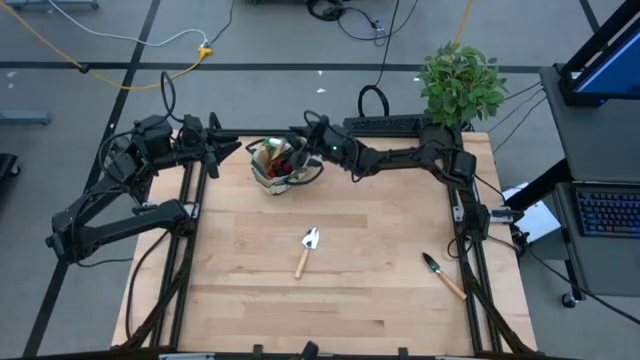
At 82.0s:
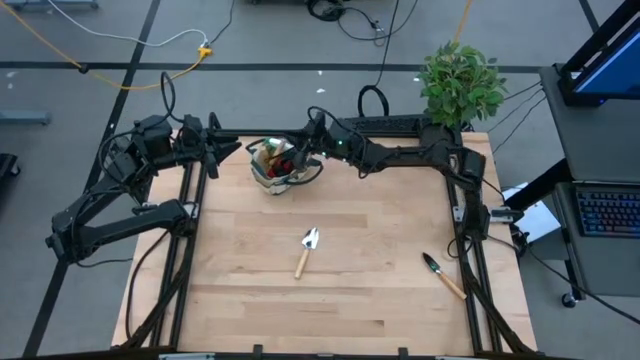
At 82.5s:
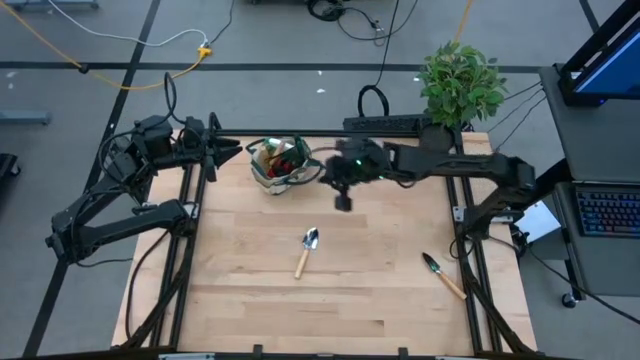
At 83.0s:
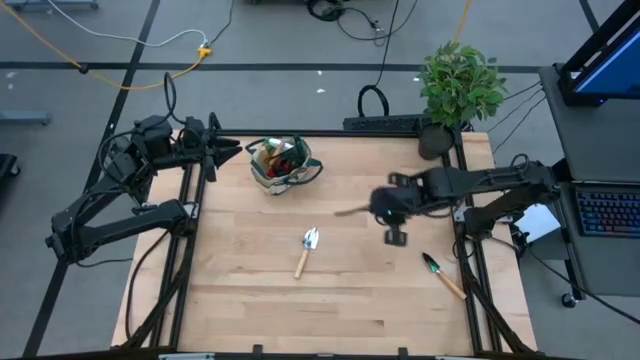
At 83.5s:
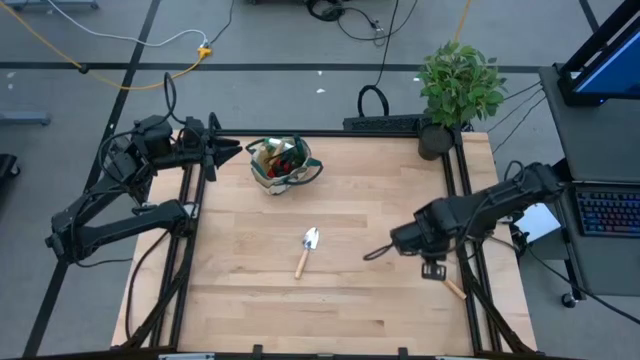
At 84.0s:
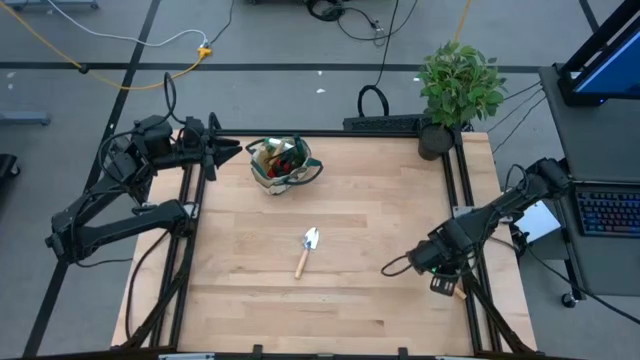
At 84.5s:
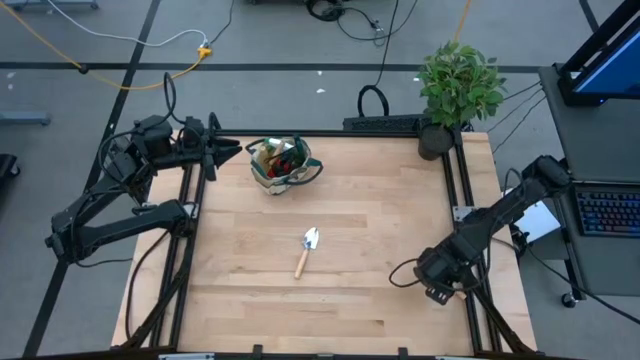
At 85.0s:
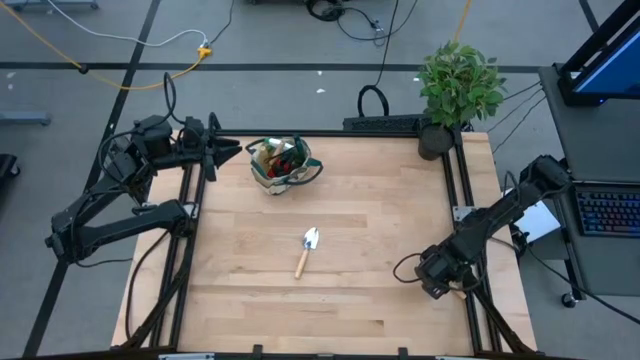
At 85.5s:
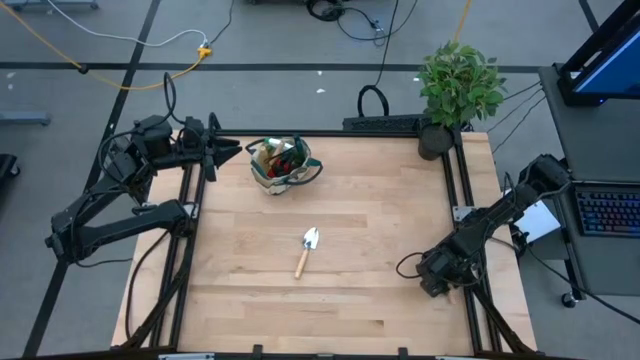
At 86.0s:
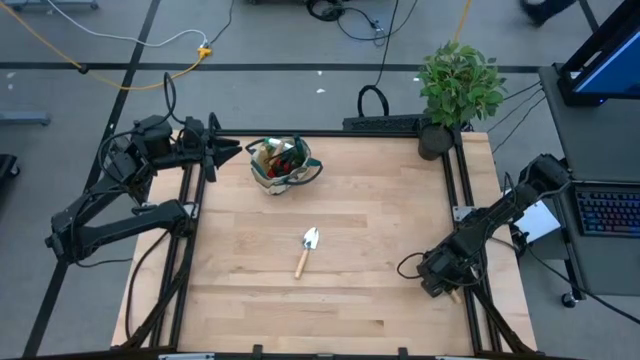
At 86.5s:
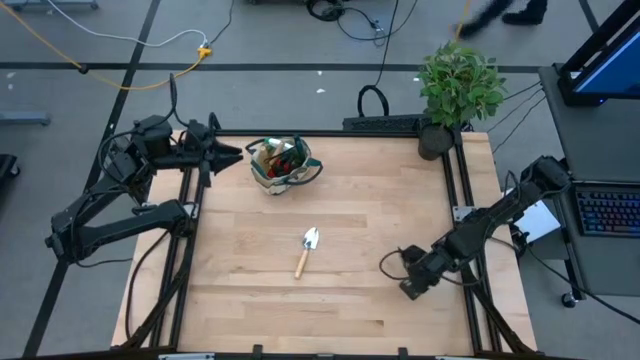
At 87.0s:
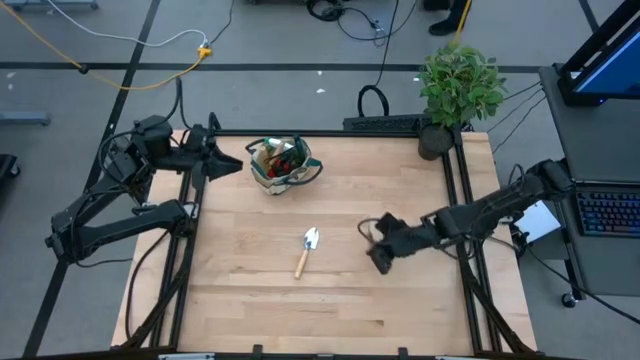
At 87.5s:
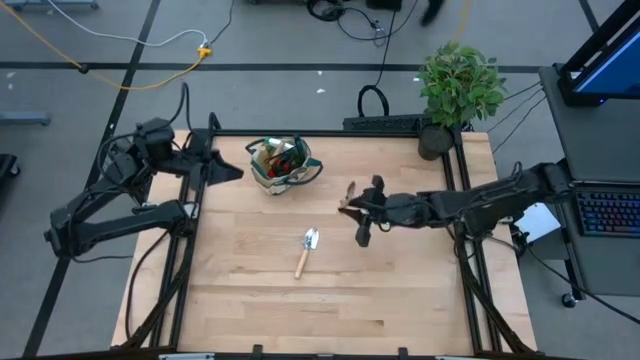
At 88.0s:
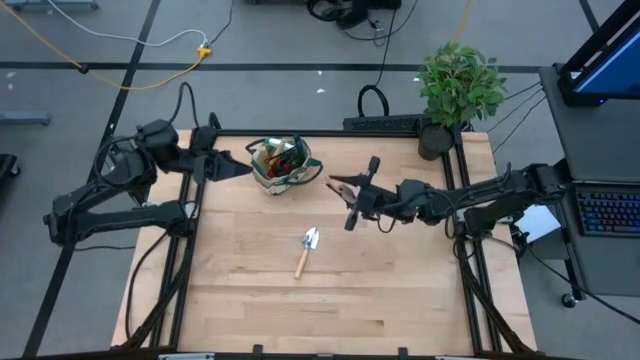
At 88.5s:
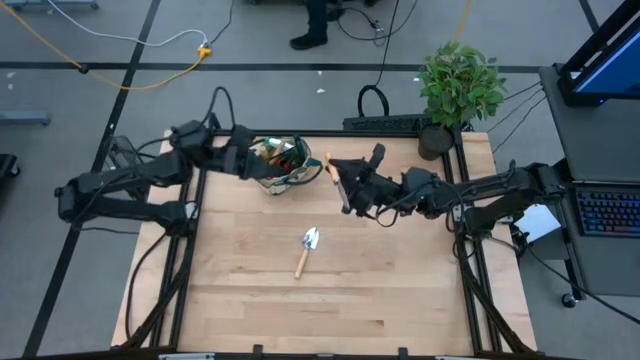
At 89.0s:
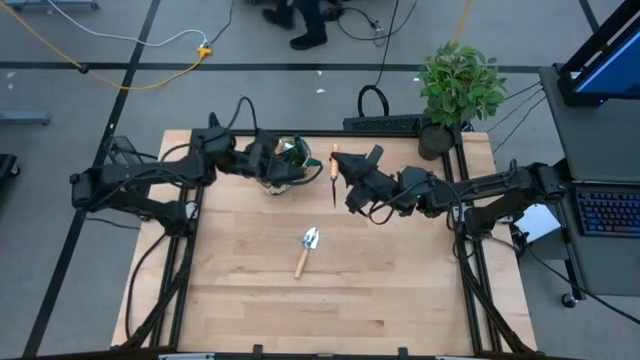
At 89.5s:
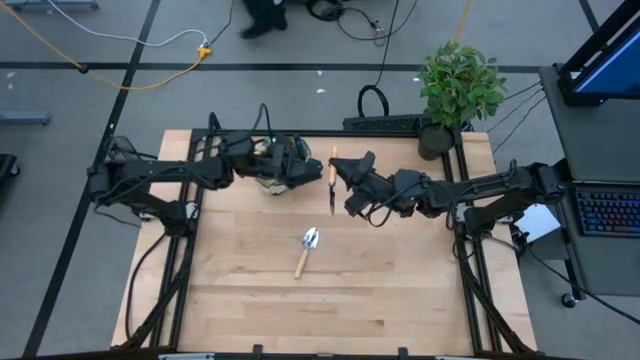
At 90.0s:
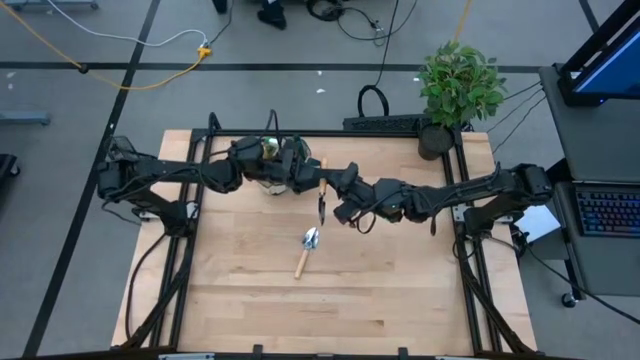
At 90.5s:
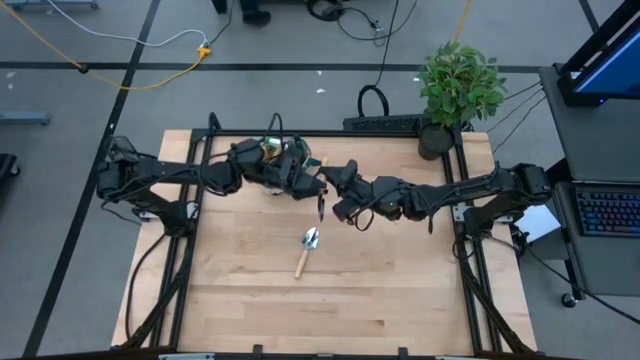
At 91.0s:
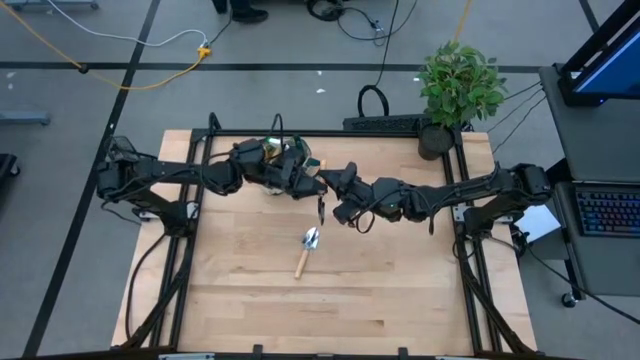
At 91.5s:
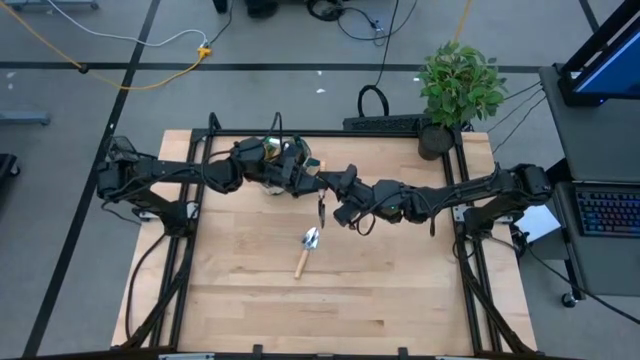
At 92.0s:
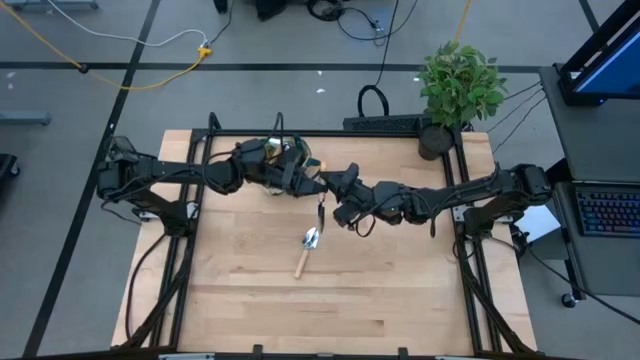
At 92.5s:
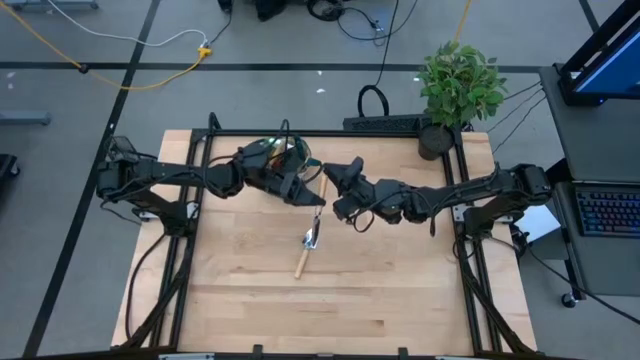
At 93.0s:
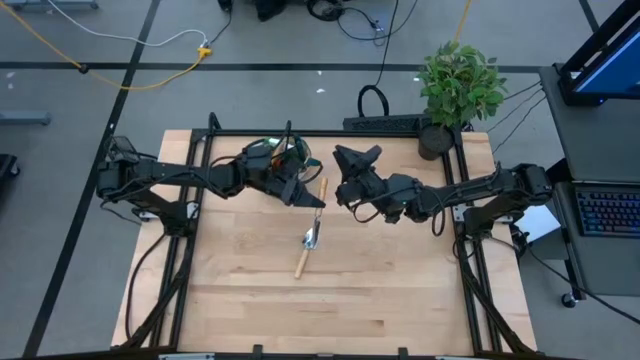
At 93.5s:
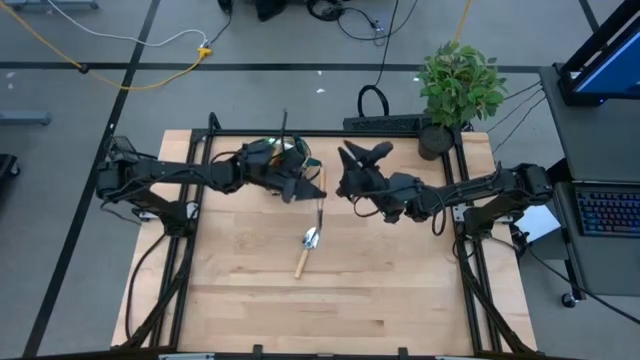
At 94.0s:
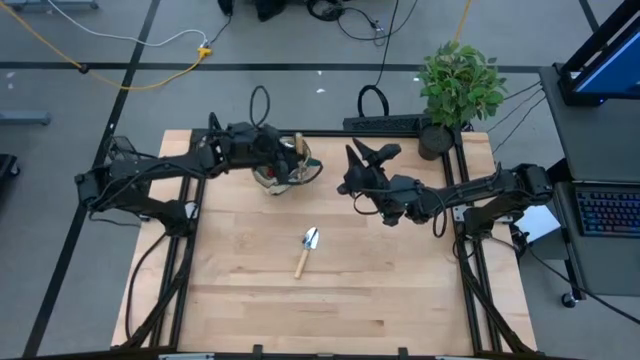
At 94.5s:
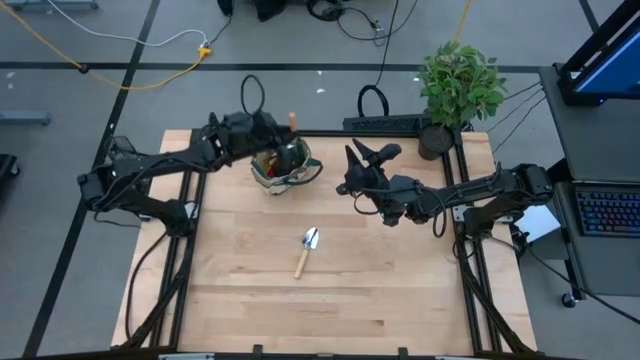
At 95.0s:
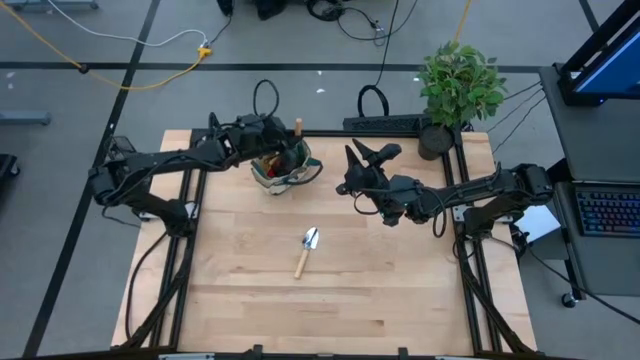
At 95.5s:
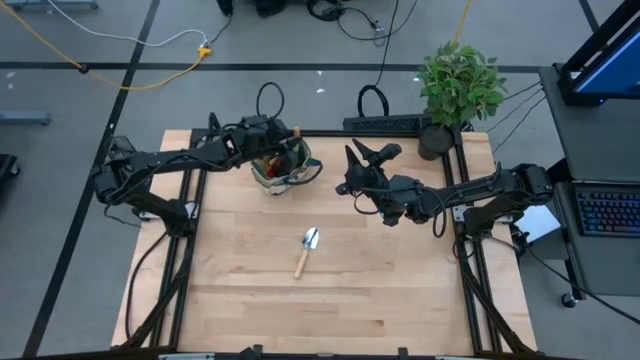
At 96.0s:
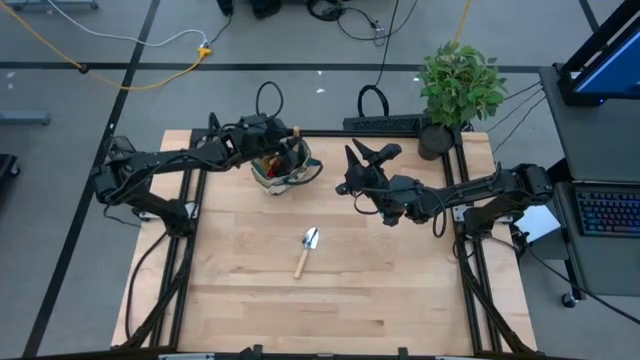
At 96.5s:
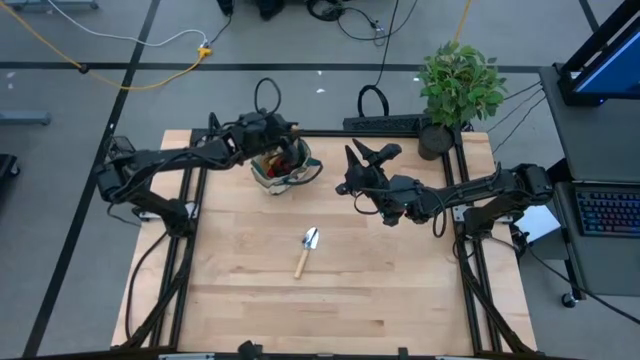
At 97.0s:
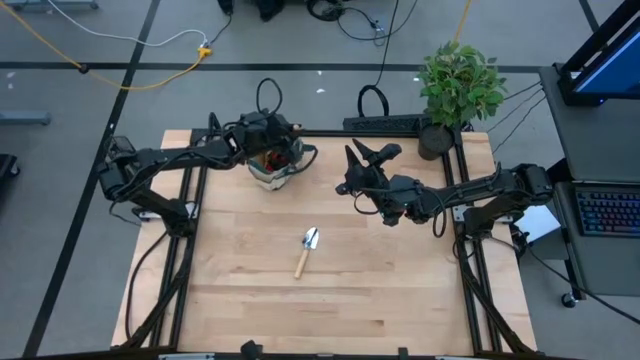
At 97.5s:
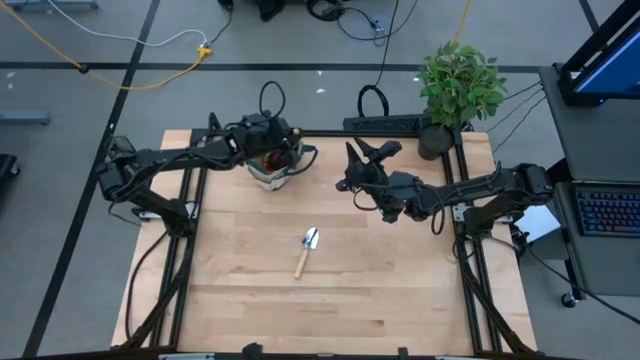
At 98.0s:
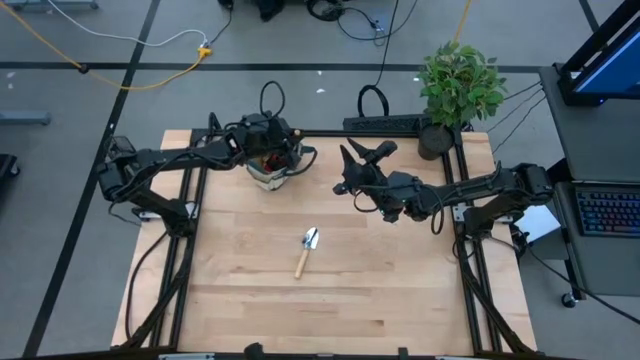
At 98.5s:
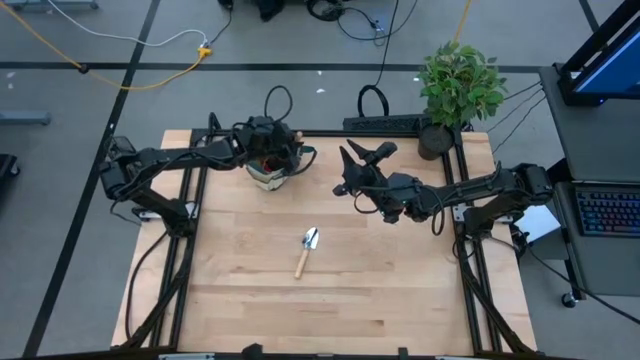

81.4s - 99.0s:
Task: Pick & Place Garden tools in Gardening bag
Put the right trowel into the gardening bag

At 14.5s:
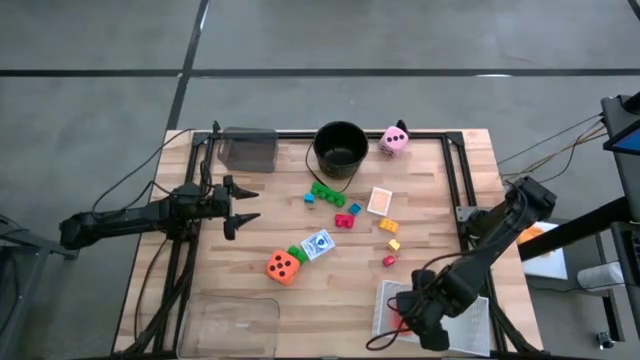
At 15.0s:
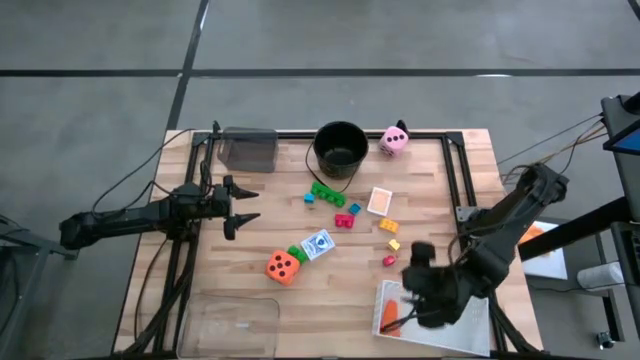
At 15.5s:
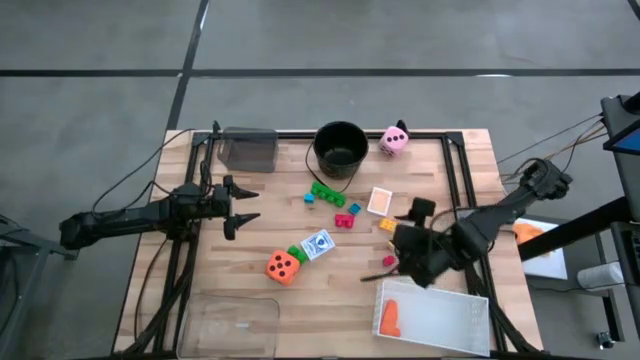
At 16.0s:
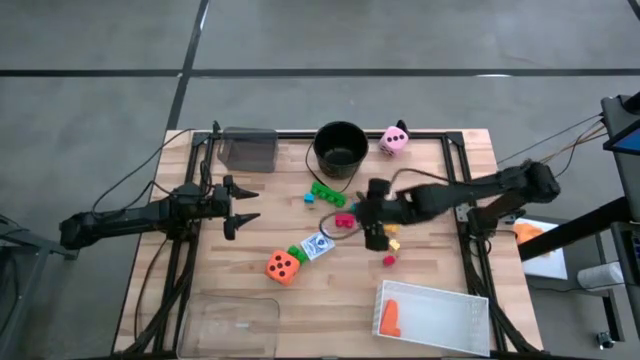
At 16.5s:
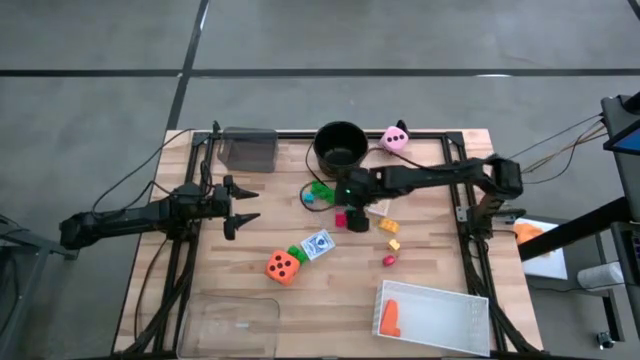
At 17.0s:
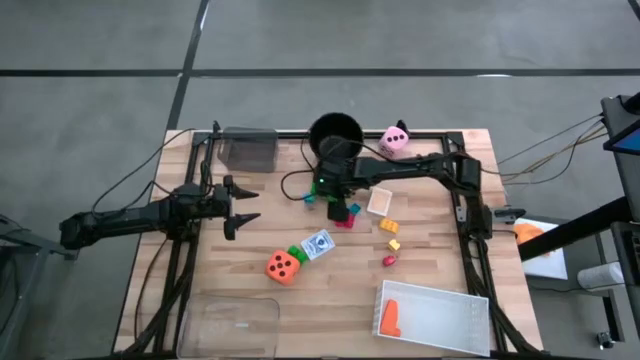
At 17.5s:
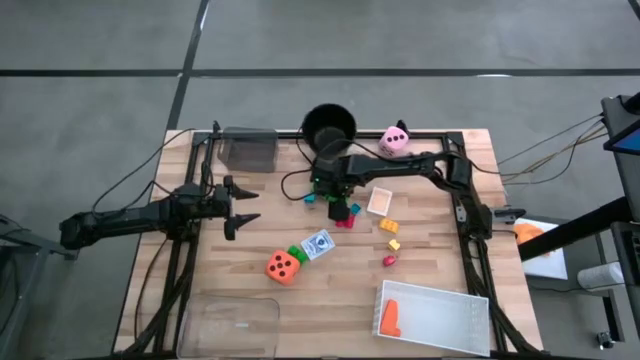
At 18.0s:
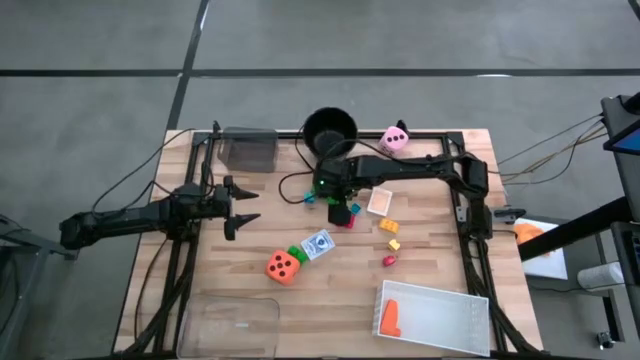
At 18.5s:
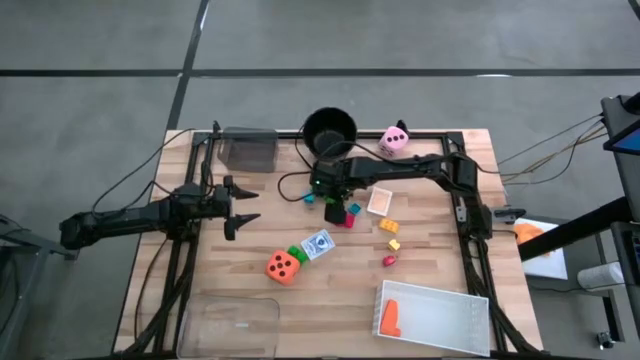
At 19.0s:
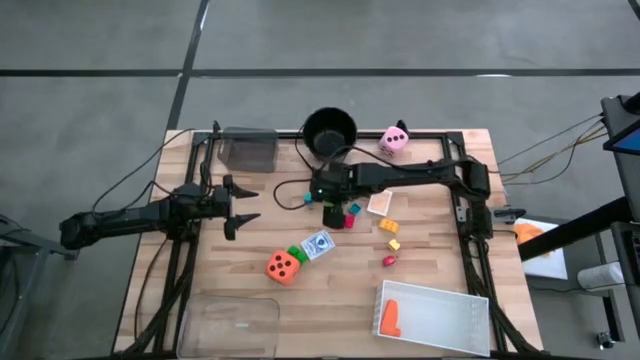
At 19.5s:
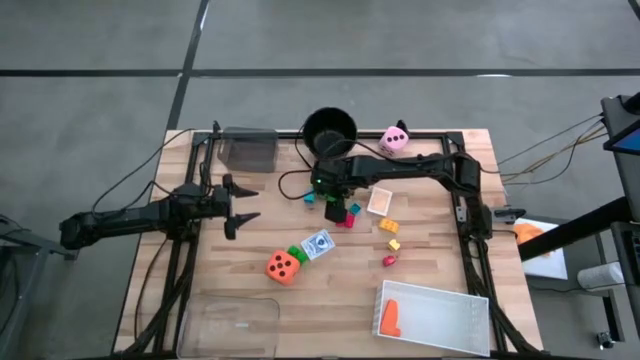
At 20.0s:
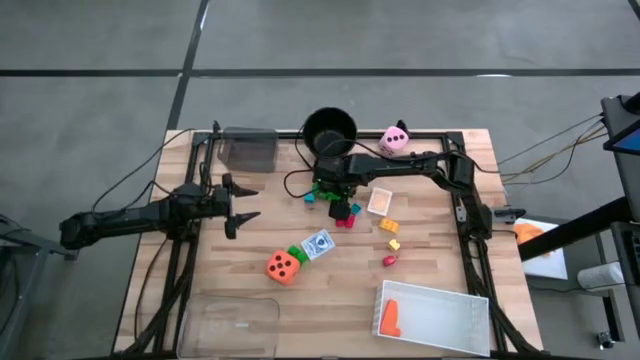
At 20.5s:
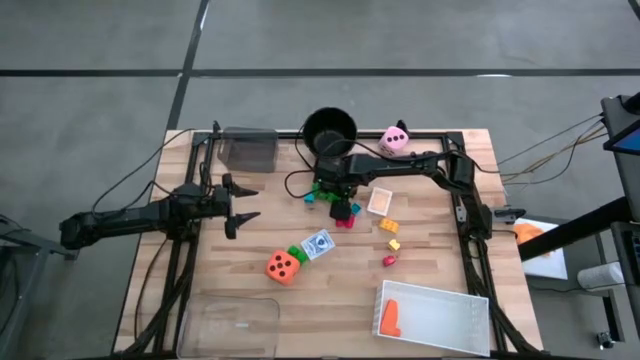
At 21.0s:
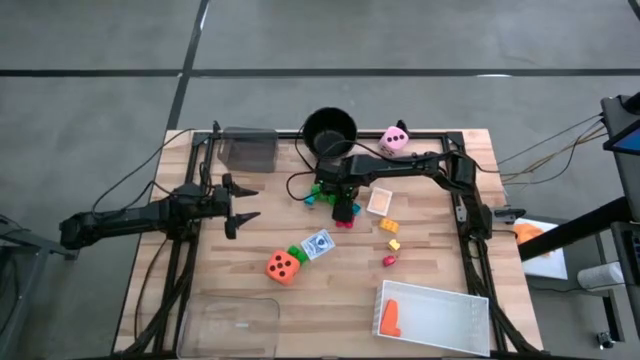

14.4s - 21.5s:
Task: Pick & Place Toys
Put the top green game piece into the white bin
